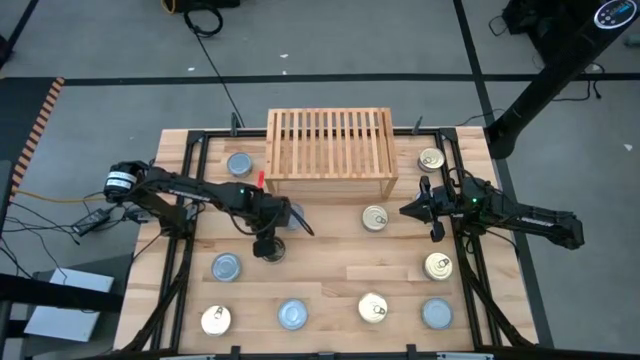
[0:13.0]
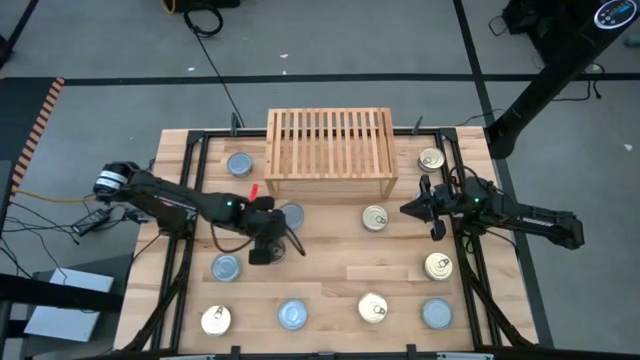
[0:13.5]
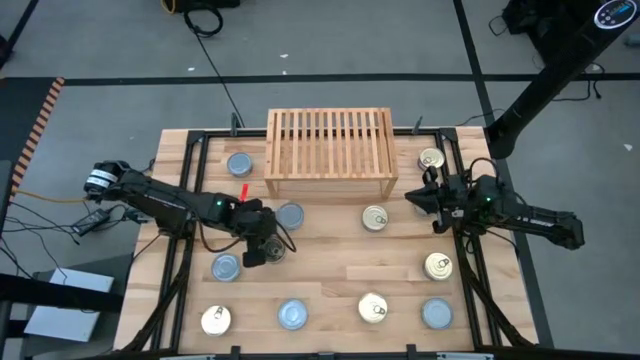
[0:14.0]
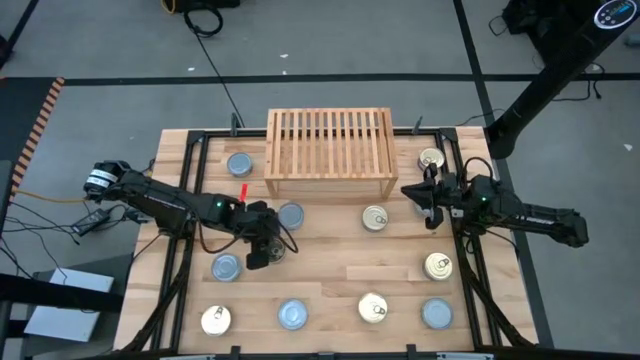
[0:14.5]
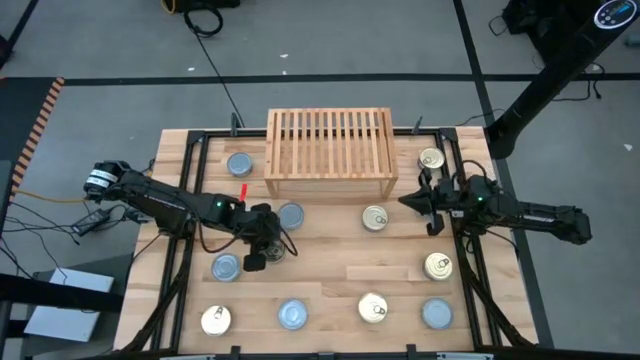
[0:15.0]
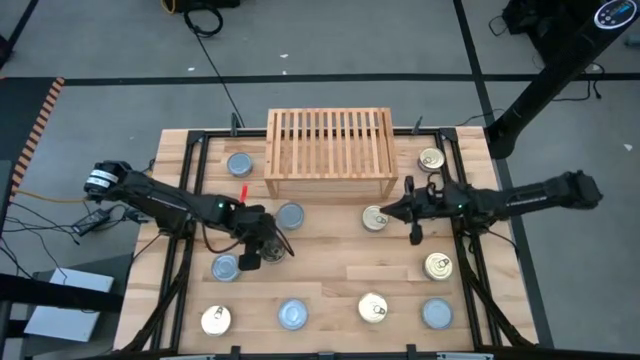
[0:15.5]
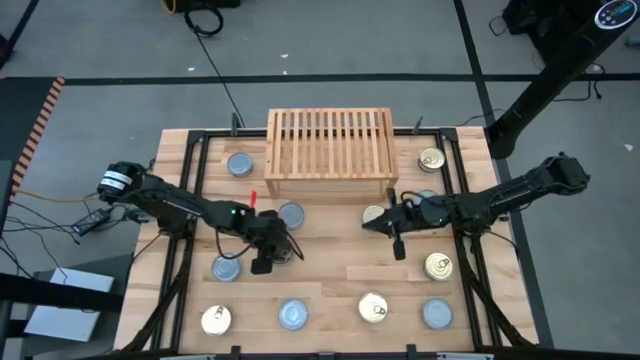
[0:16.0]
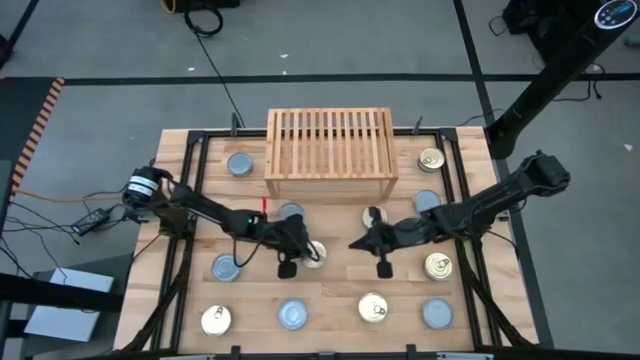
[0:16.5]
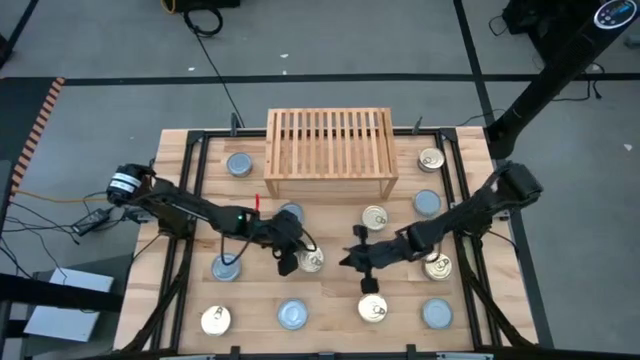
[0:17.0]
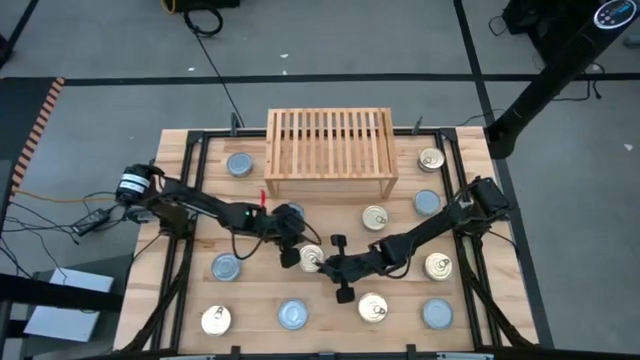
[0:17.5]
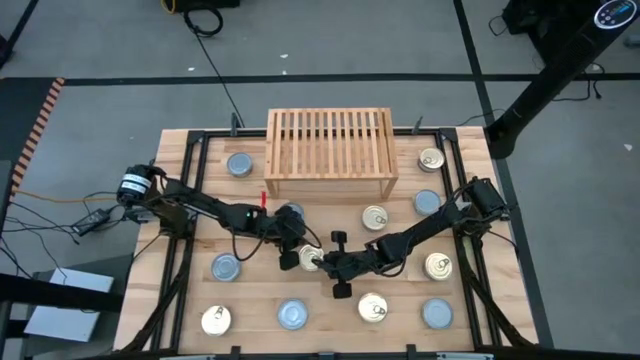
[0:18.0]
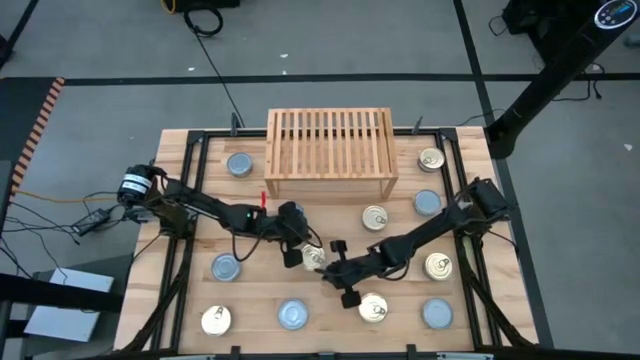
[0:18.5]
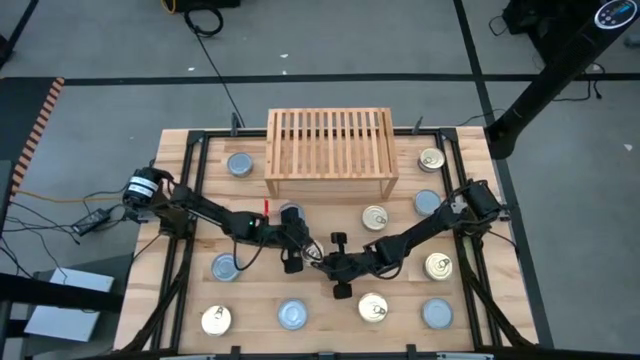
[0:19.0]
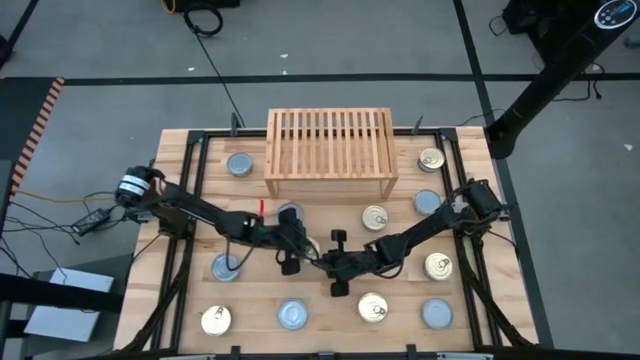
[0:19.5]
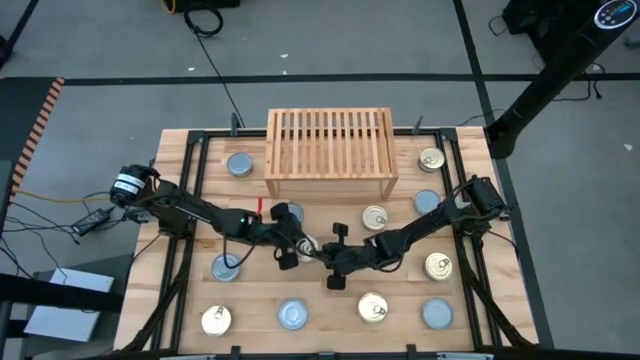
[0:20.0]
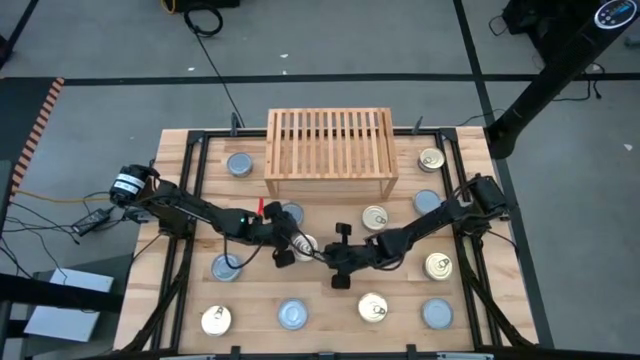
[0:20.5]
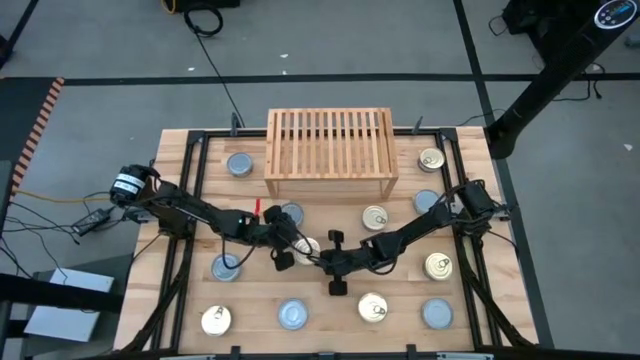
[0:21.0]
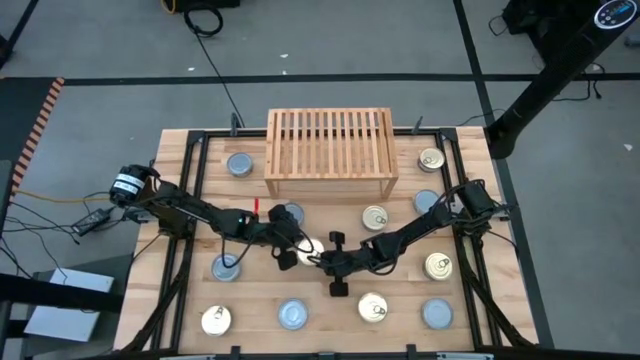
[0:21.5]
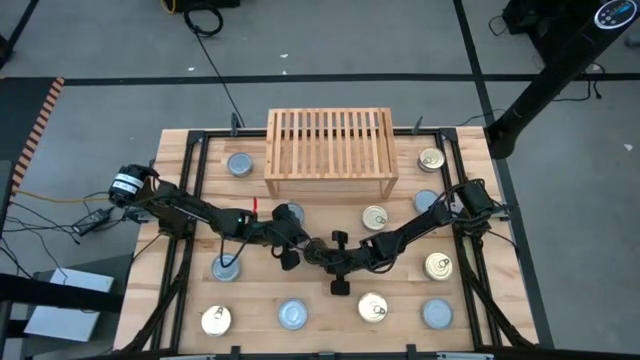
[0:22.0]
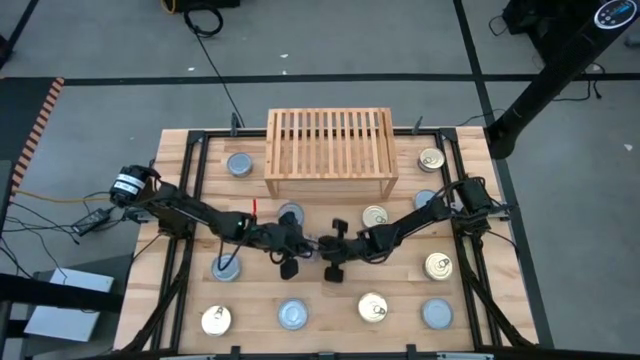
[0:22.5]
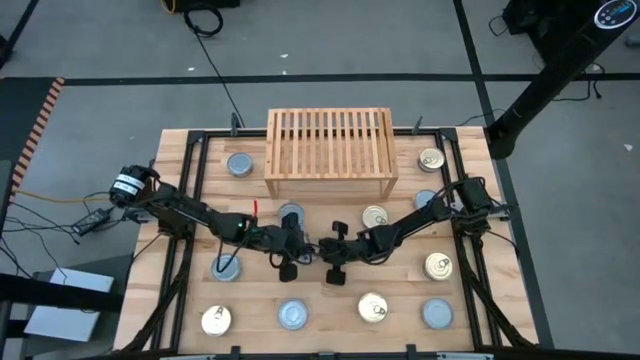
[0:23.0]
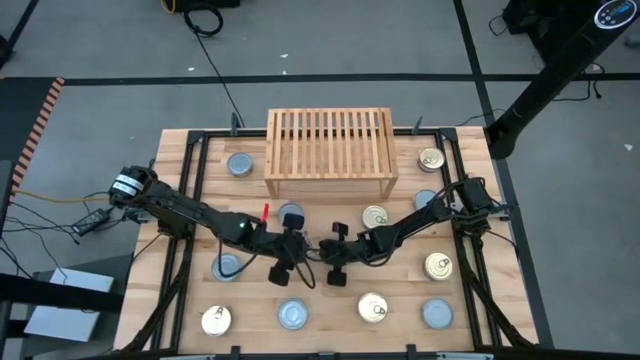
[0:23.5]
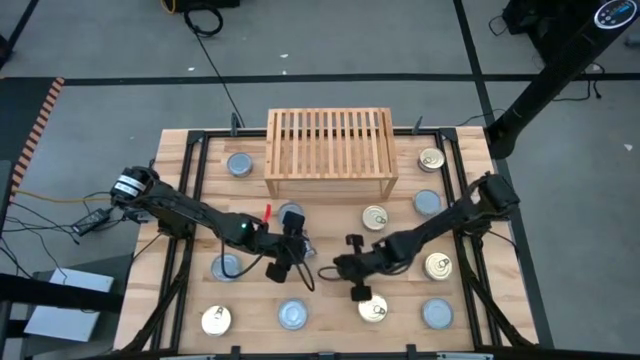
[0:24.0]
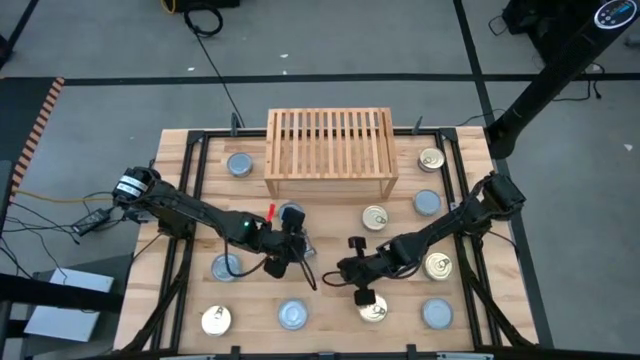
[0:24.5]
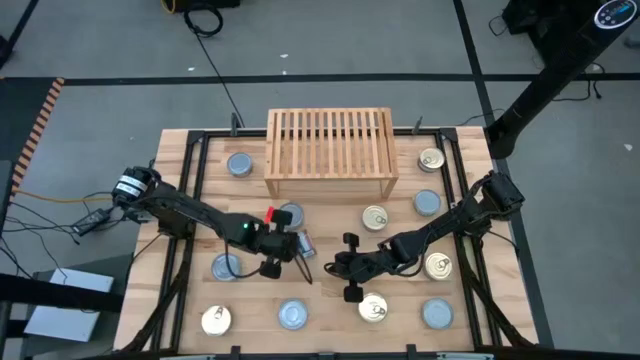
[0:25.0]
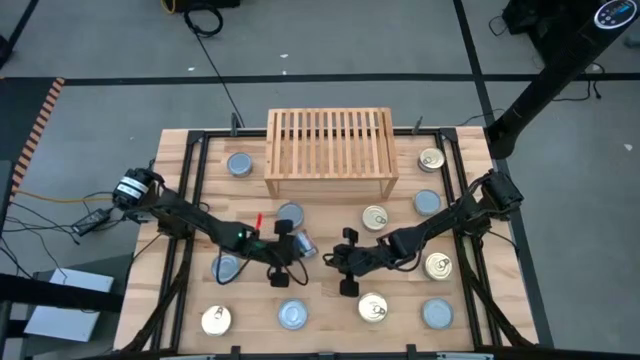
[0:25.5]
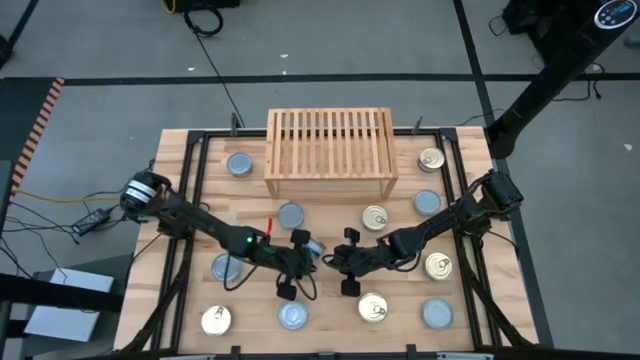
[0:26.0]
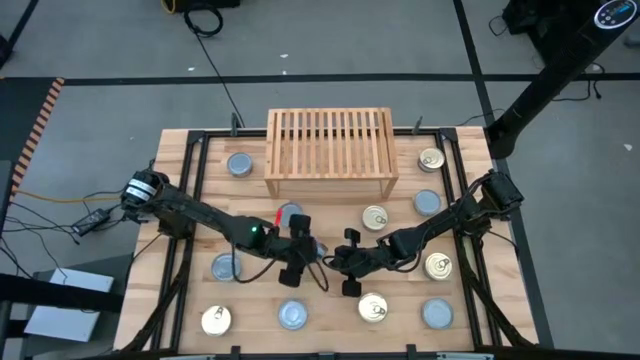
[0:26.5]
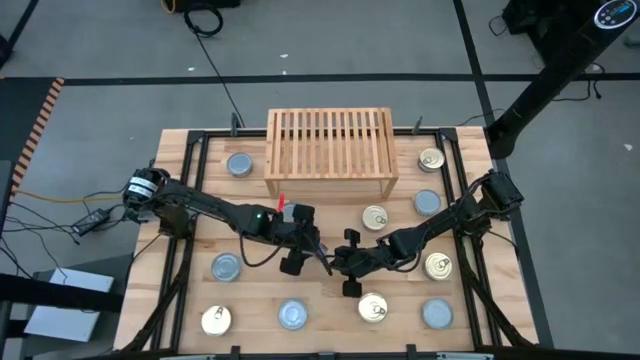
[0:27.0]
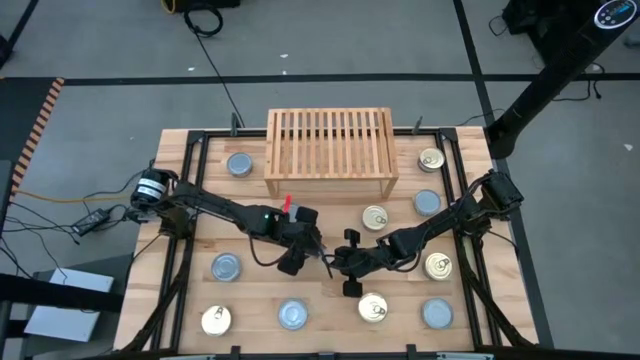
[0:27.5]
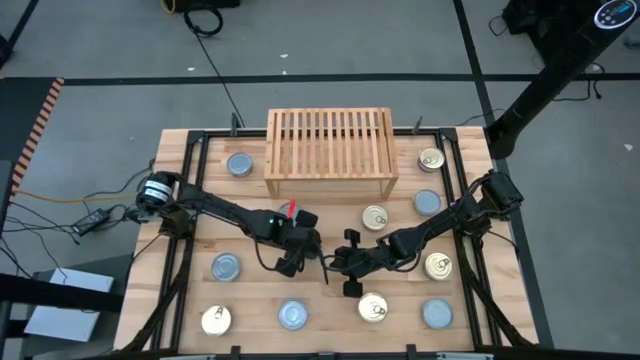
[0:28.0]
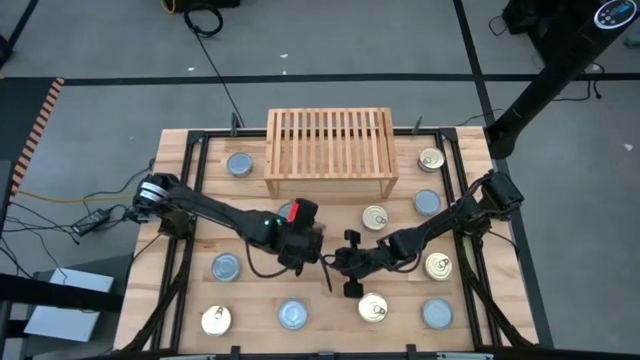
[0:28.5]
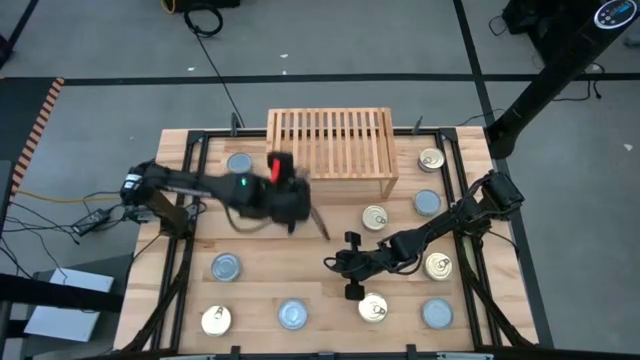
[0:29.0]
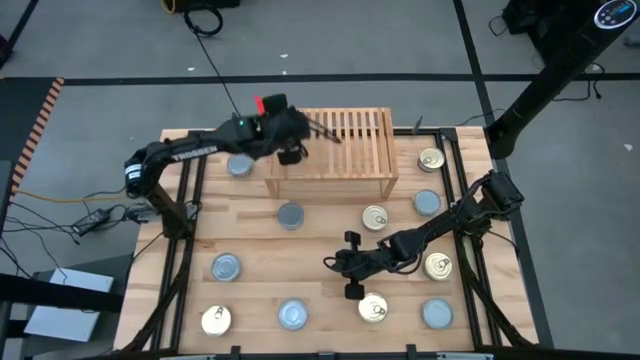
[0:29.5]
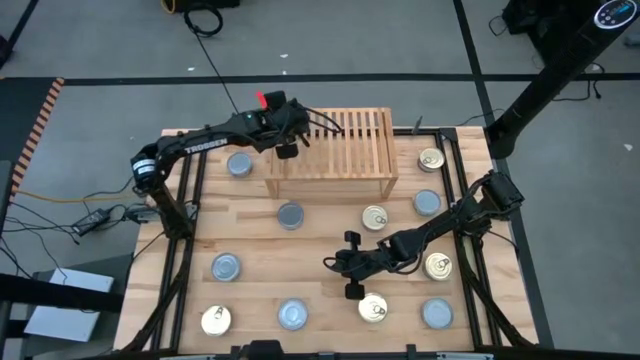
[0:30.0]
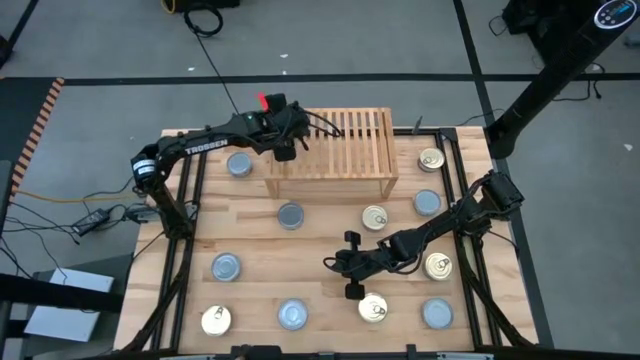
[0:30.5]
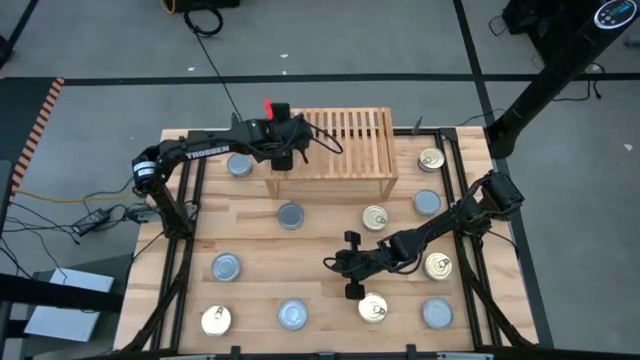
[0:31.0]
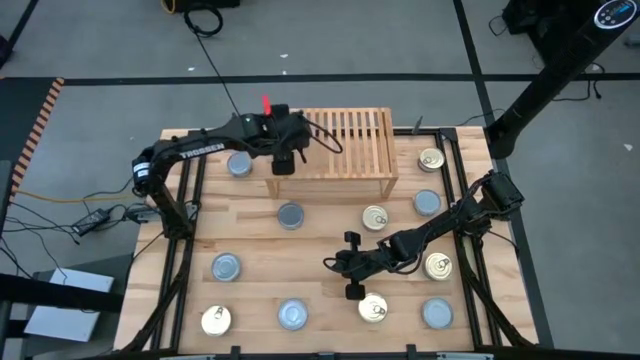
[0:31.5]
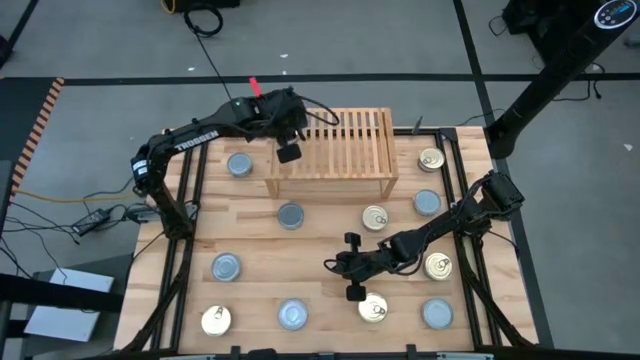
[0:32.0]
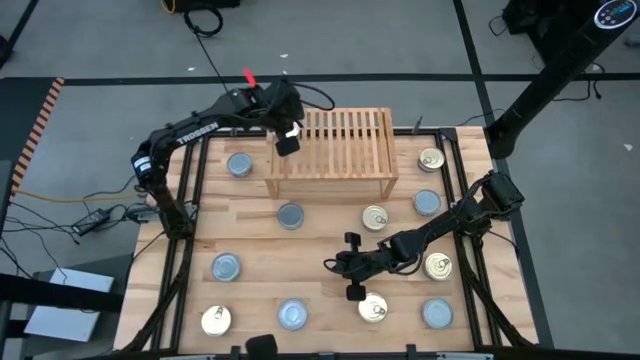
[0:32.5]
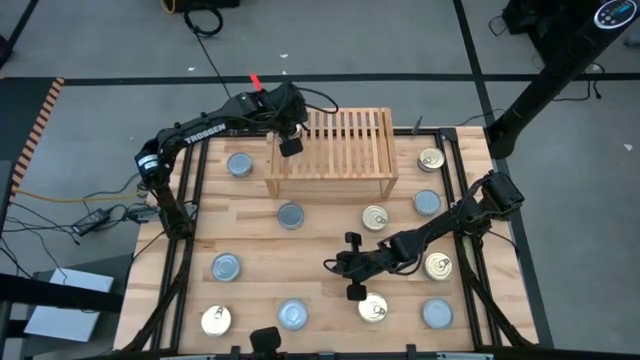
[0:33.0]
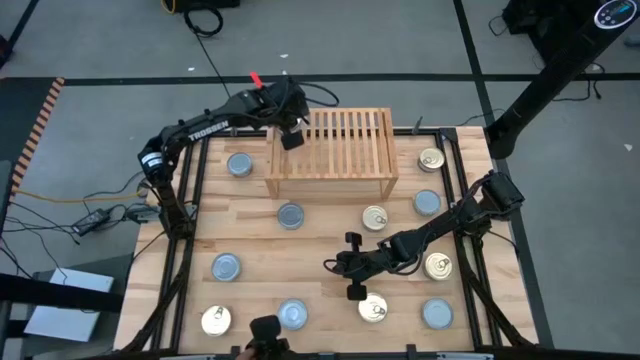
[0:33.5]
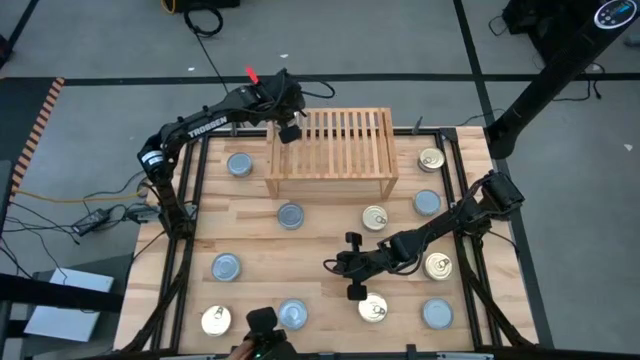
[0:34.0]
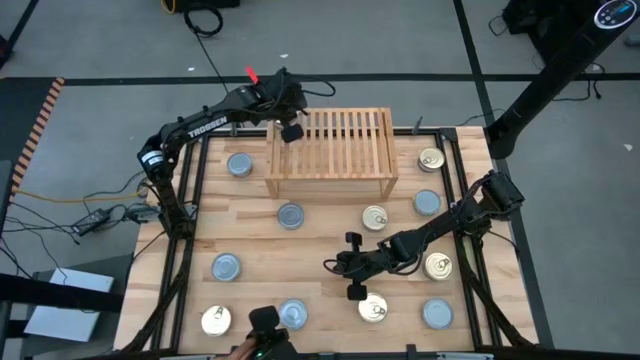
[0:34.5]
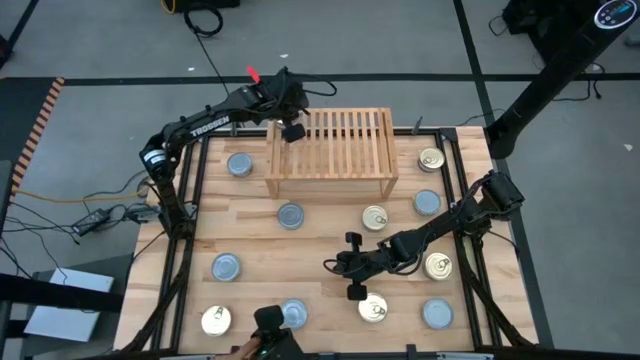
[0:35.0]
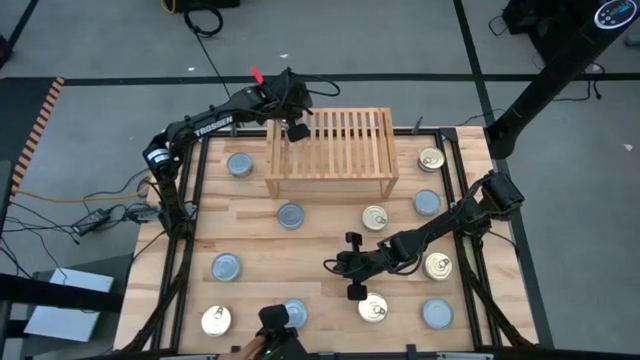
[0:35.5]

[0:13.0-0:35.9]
Task: Stack canned seafood by type on shelf
Put the blue pink tuna can on the shelf
